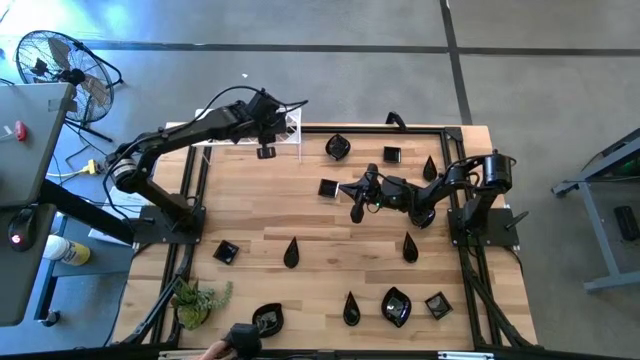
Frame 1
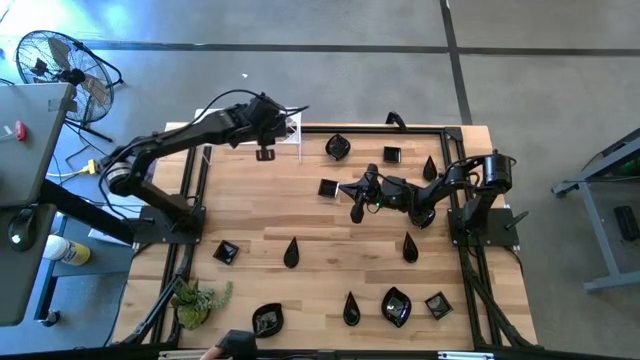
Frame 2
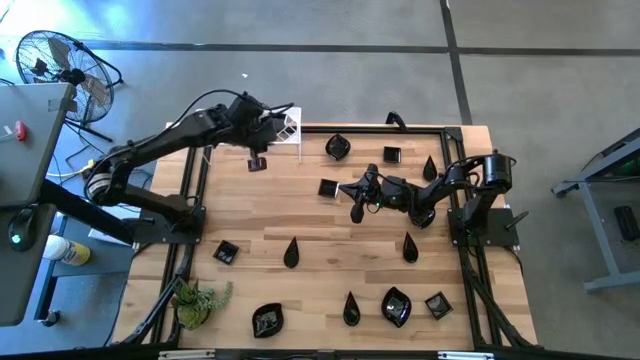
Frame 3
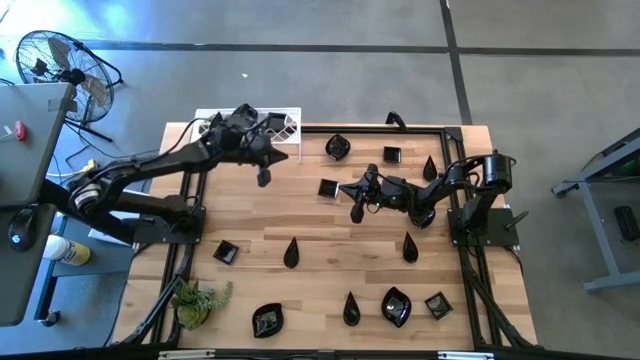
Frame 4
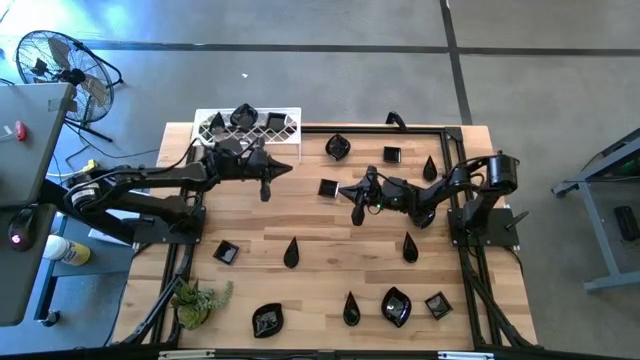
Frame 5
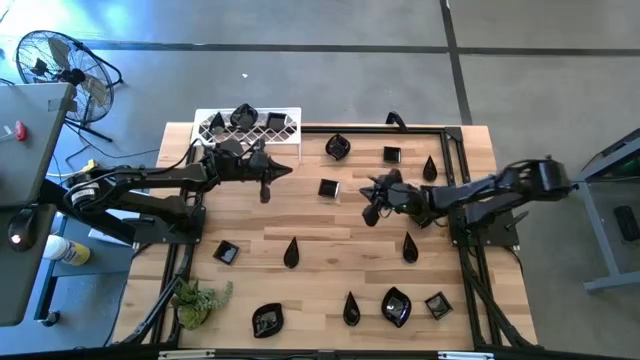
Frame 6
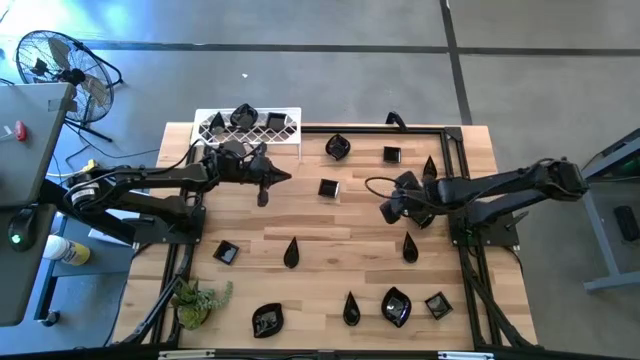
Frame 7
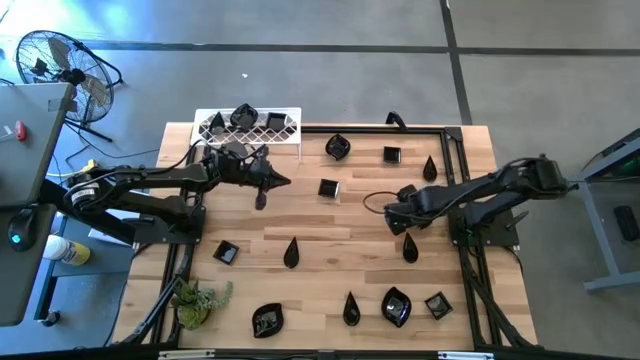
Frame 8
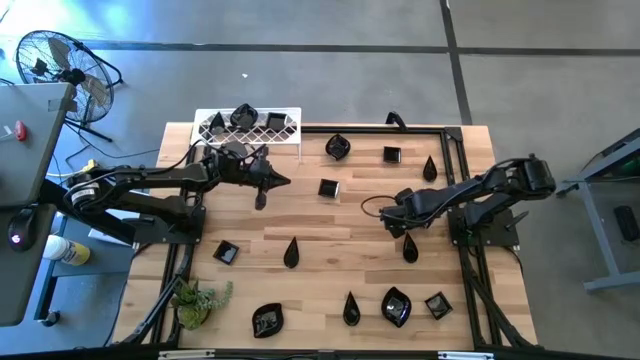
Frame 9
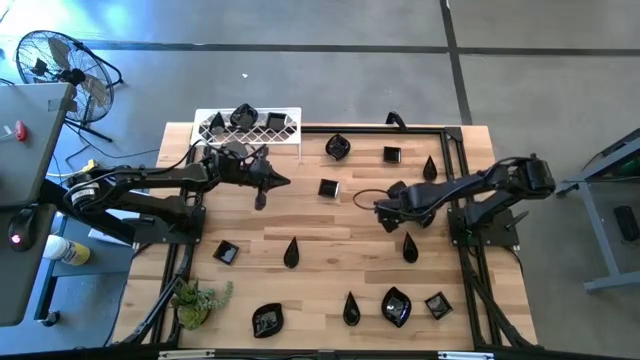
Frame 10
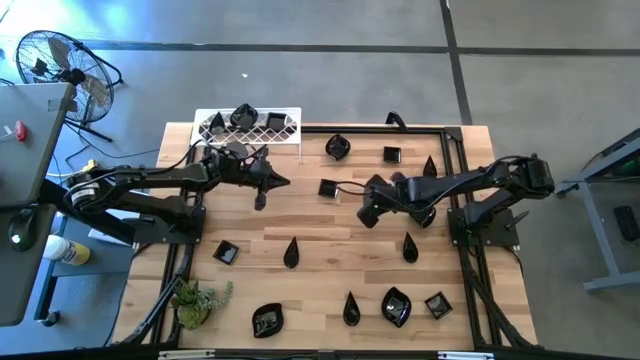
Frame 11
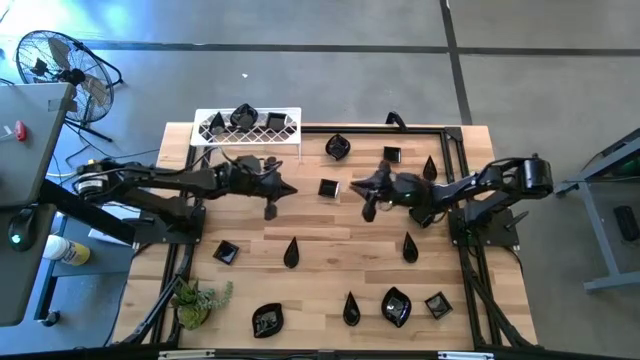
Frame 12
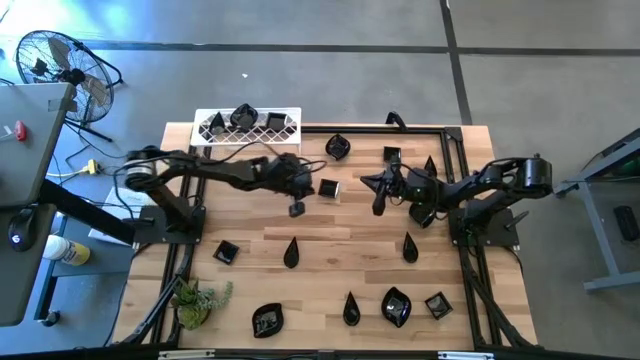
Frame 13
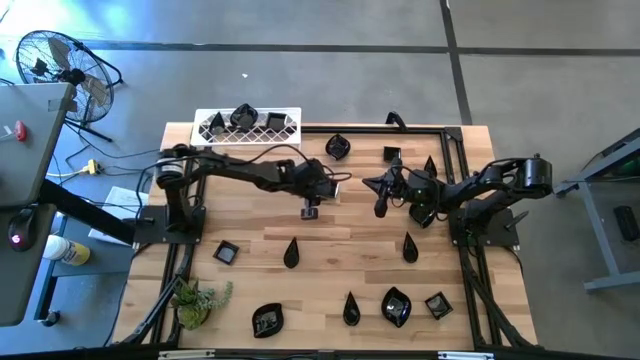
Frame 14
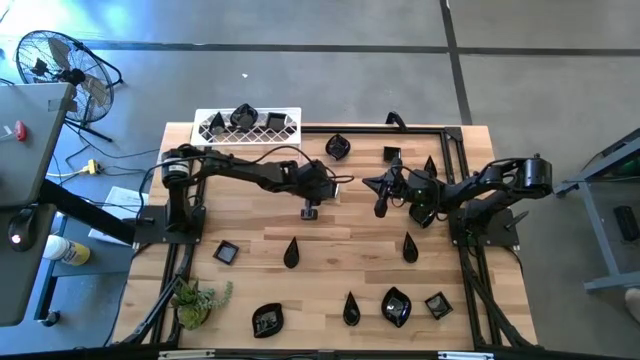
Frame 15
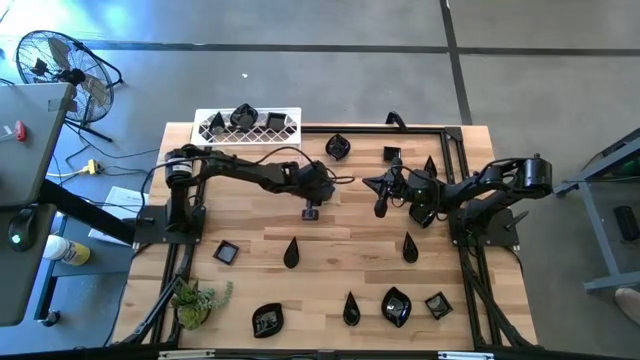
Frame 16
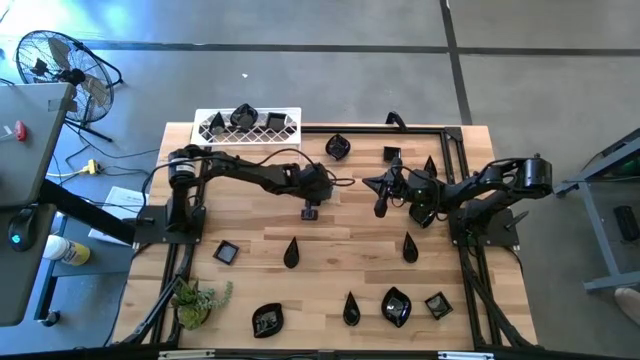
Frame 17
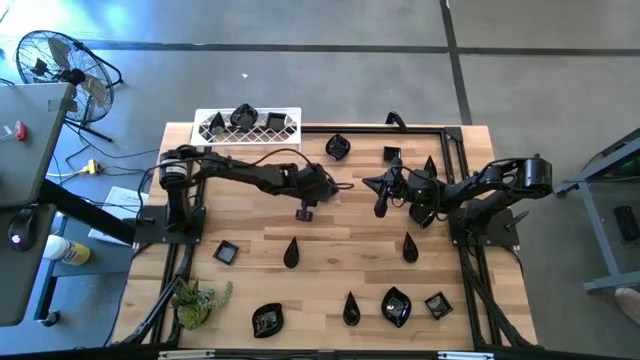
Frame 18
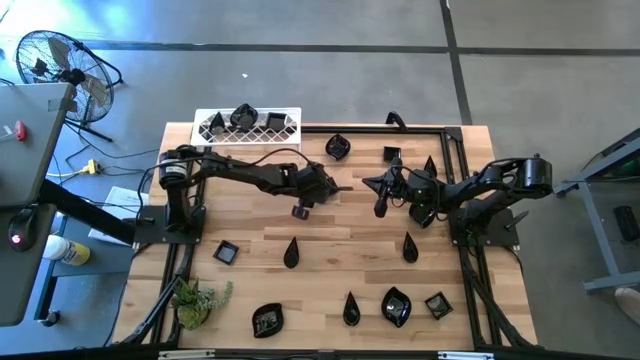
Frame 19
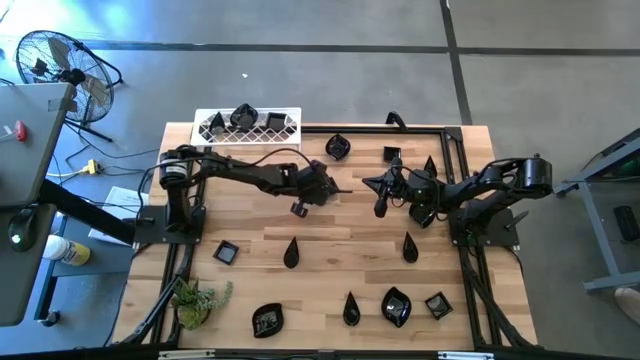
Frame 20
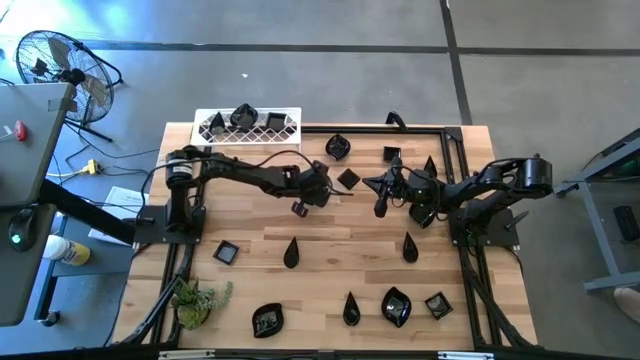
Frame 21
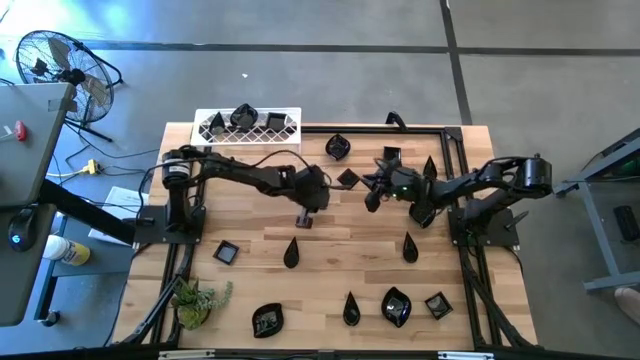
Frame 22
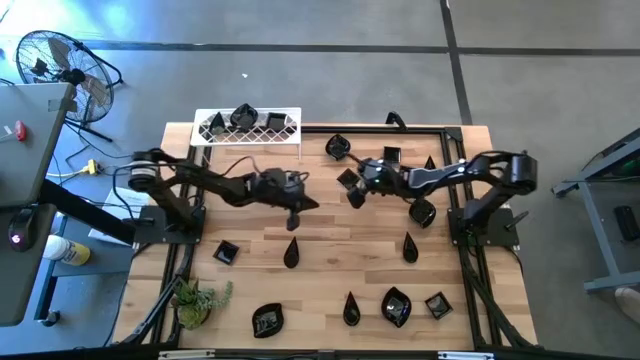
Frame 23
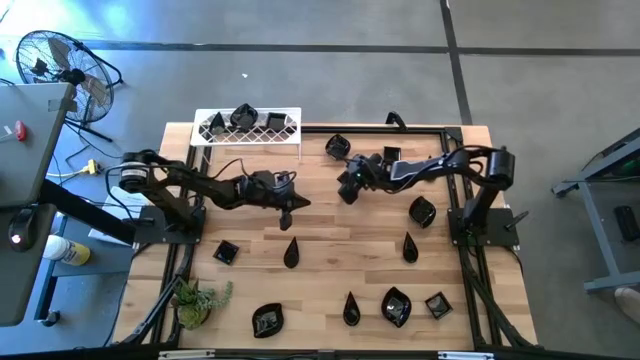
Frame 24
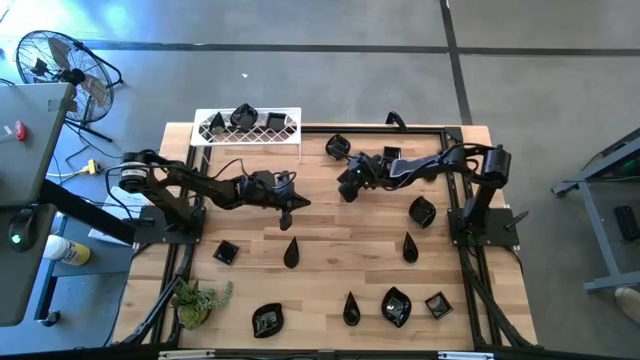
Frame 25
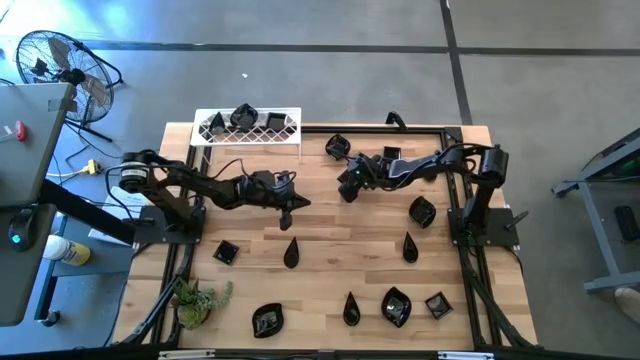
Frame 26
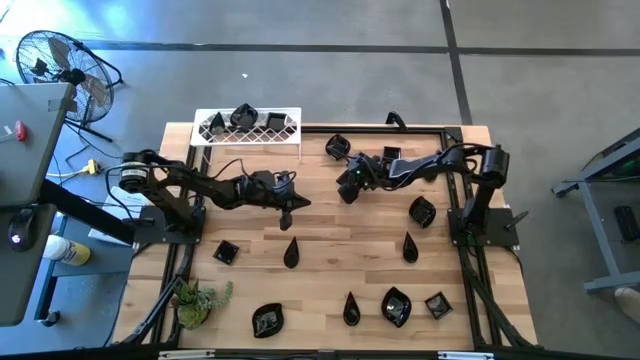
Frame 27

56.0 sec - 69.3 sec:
Task: Pick & Place Mini shaped plates
Stack the square plate on top of the square plate on the shelf

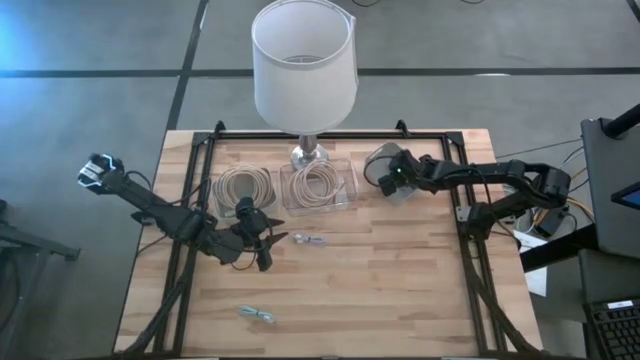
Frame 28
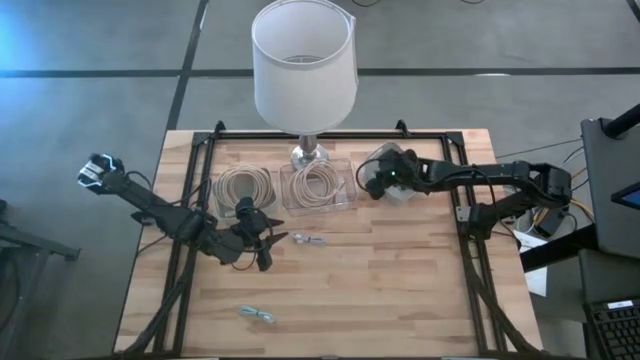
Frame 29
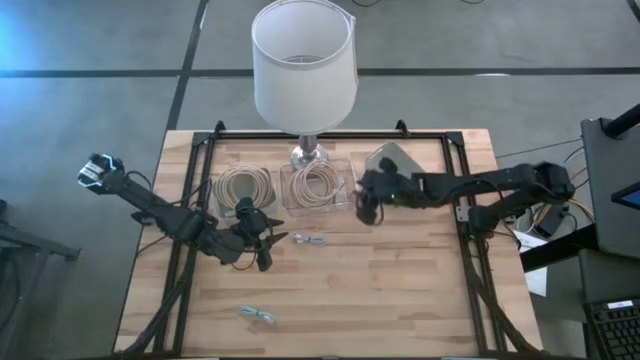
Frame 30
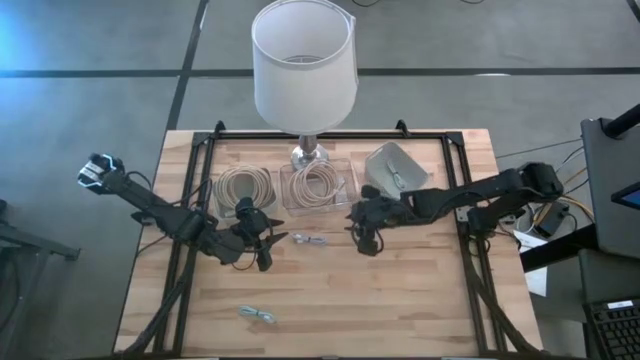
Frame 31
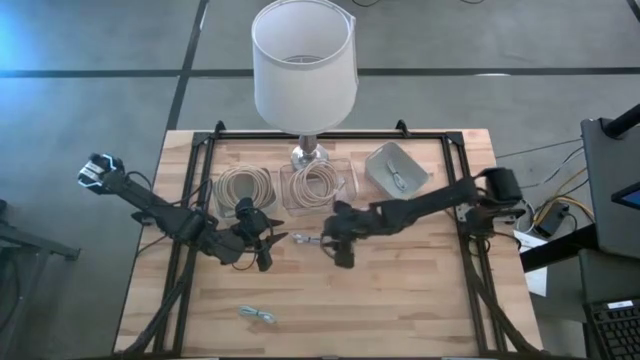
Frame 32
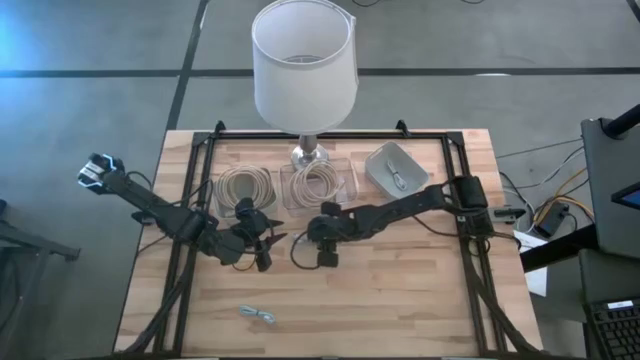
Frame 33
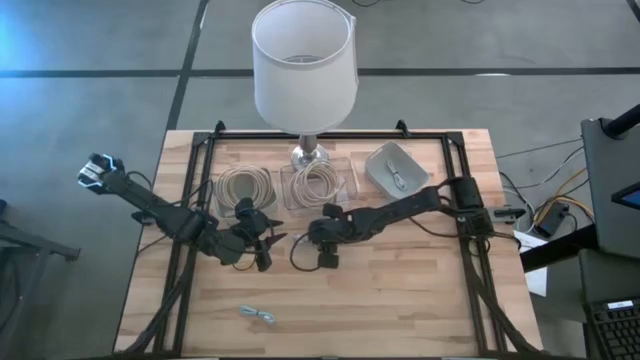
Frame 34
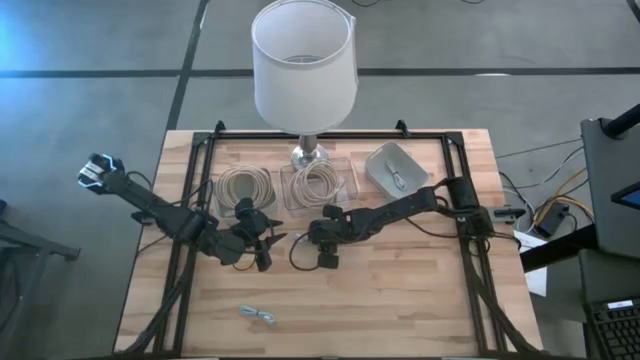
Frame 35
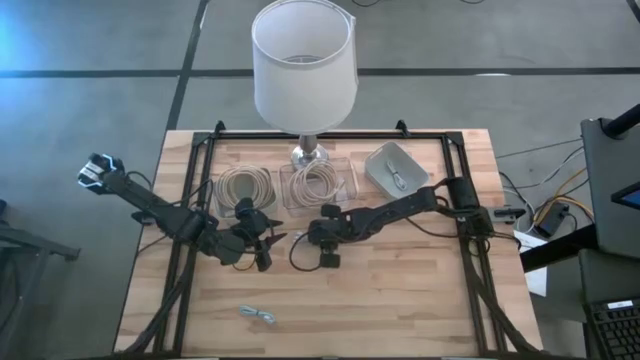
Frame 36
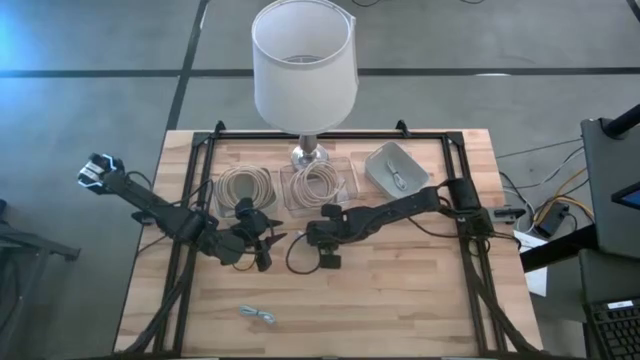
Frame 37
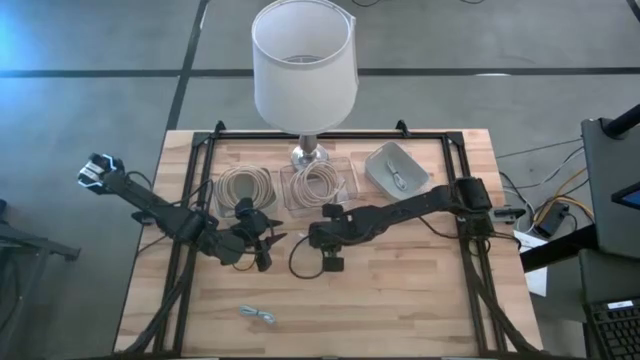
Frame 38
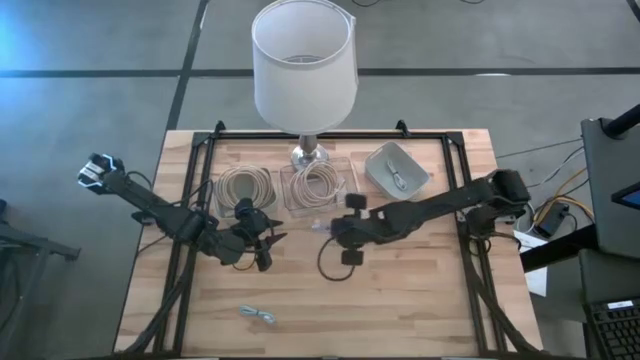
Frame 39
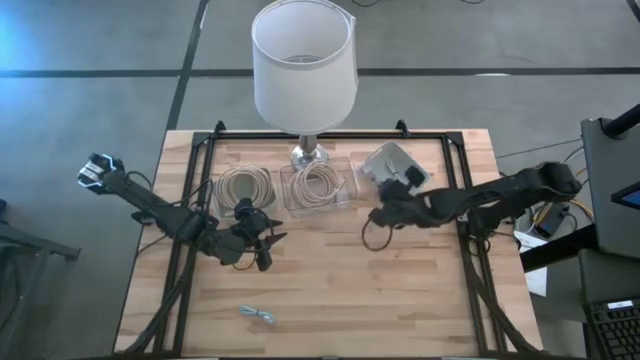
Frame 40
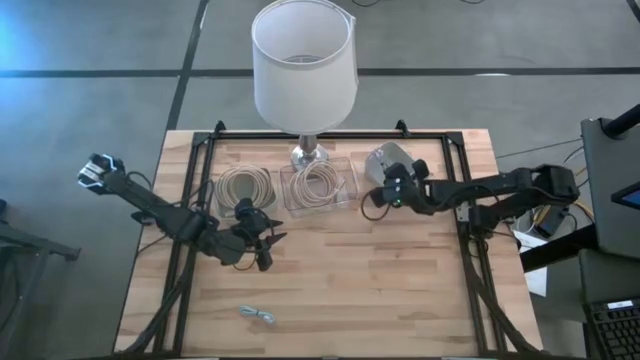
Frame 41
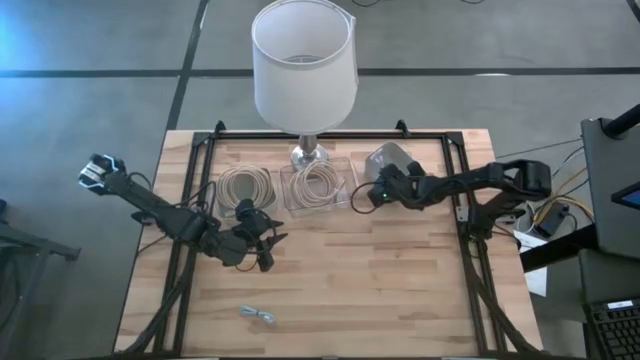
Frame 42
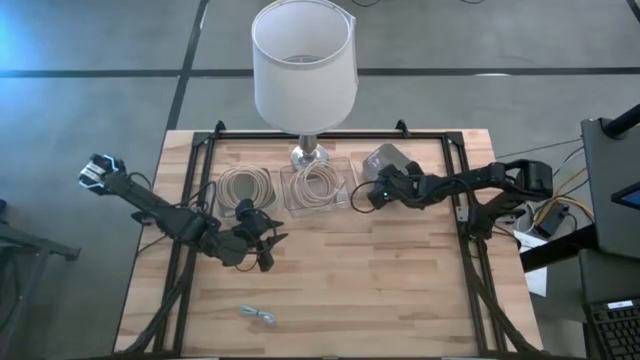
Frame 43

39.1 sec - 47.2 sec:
Task: Pick & Place USB Port
Put the purple charger cable into the right gray bin
